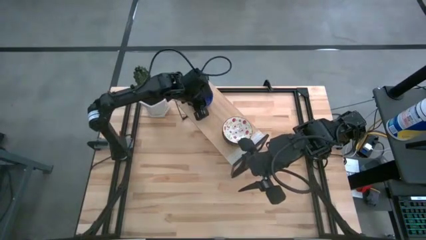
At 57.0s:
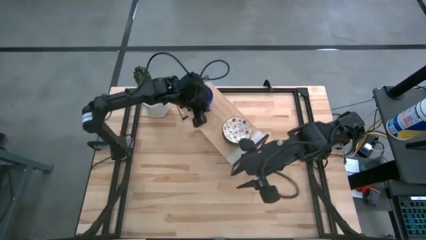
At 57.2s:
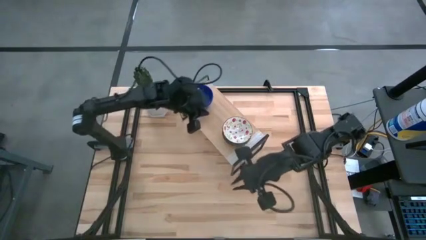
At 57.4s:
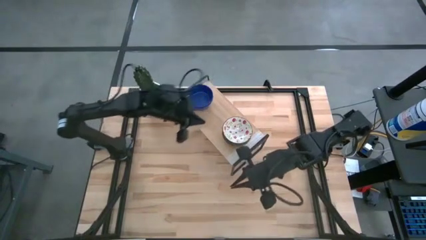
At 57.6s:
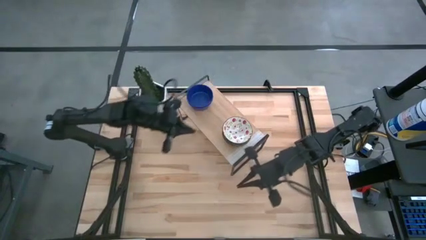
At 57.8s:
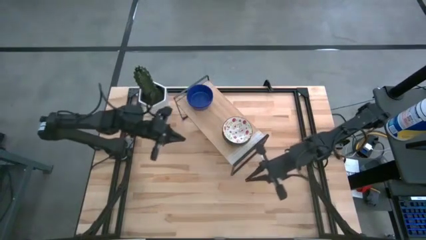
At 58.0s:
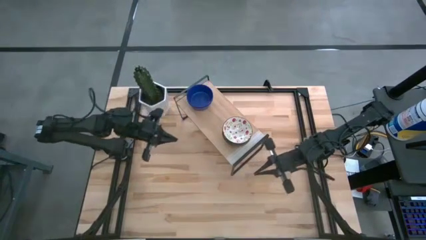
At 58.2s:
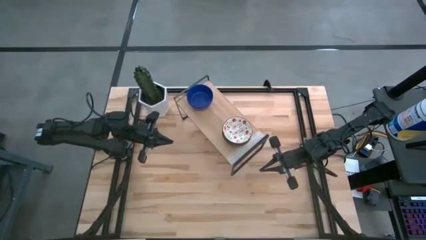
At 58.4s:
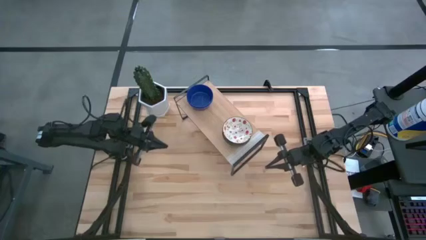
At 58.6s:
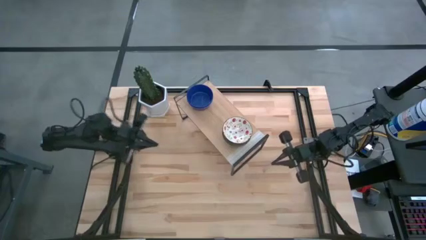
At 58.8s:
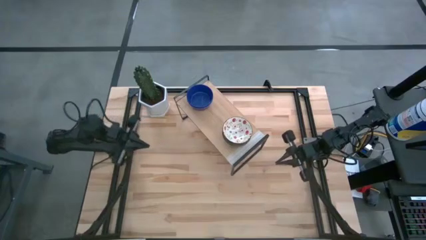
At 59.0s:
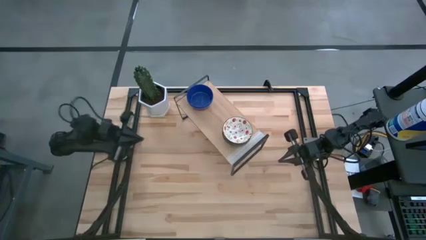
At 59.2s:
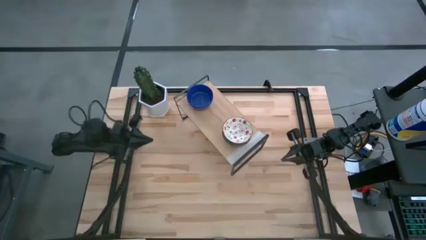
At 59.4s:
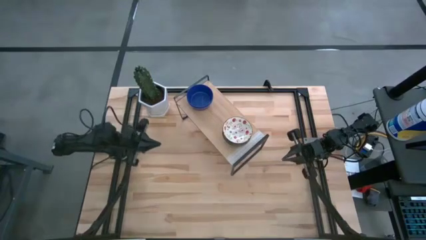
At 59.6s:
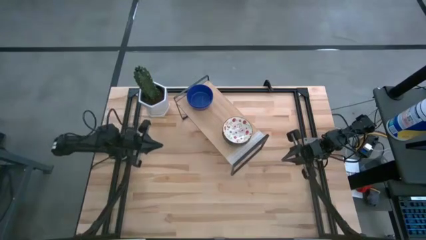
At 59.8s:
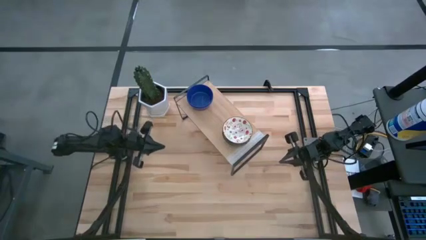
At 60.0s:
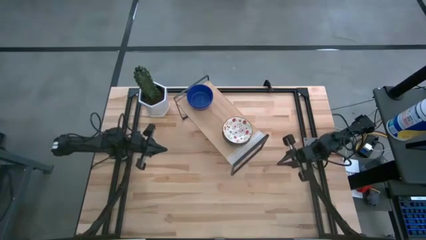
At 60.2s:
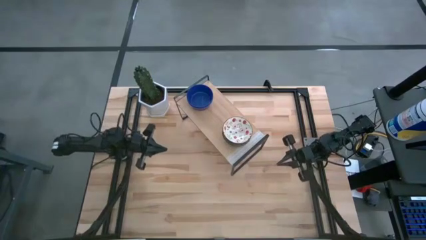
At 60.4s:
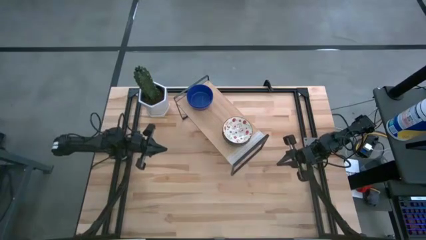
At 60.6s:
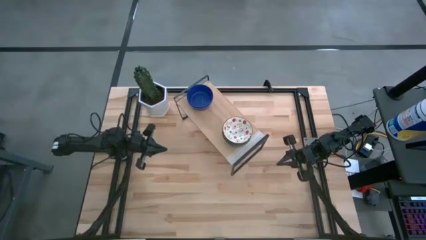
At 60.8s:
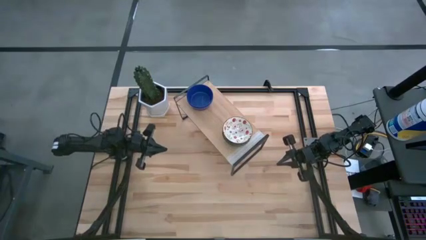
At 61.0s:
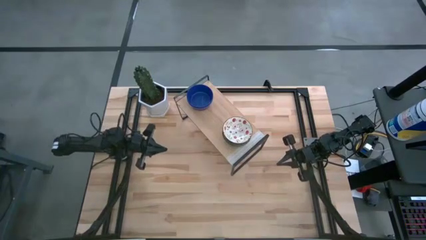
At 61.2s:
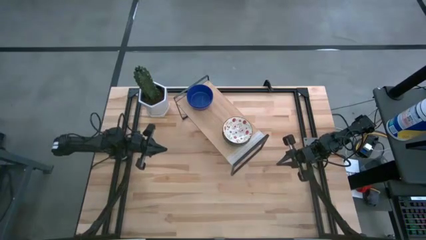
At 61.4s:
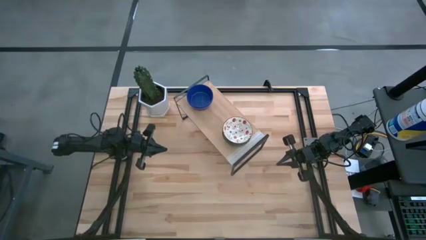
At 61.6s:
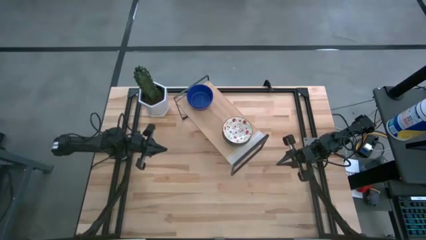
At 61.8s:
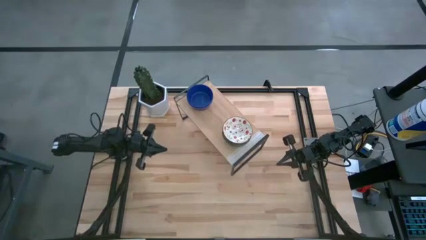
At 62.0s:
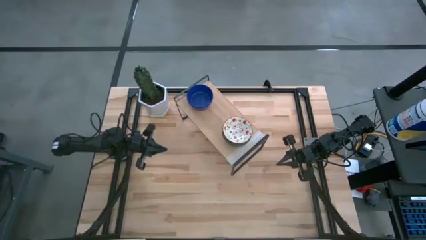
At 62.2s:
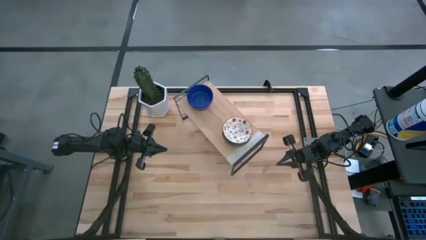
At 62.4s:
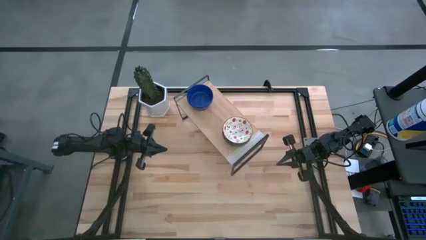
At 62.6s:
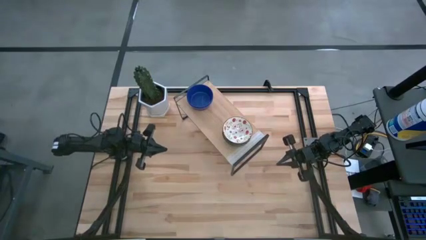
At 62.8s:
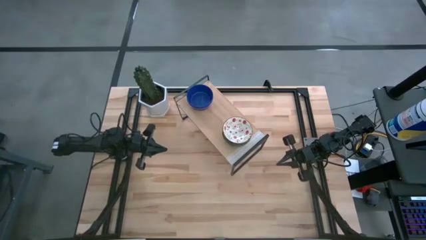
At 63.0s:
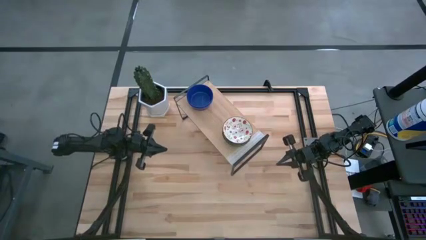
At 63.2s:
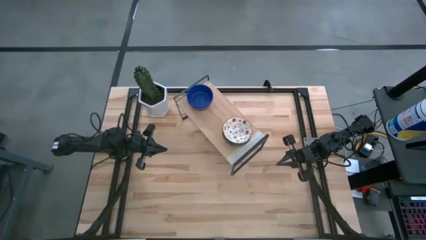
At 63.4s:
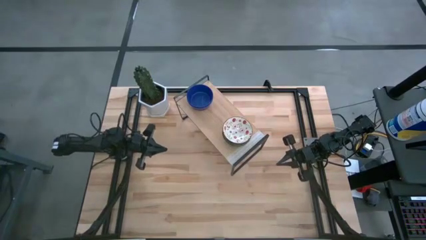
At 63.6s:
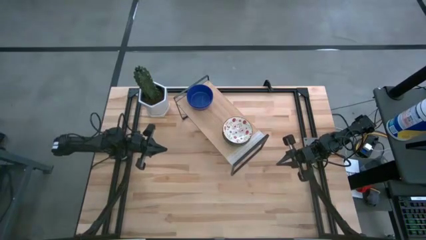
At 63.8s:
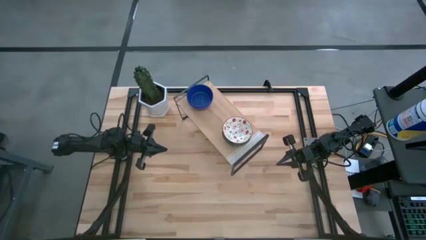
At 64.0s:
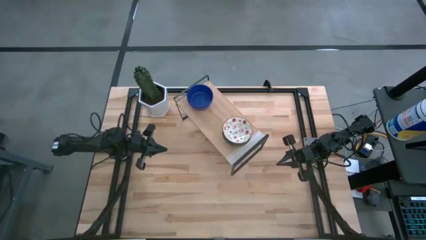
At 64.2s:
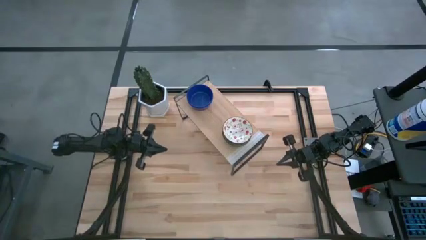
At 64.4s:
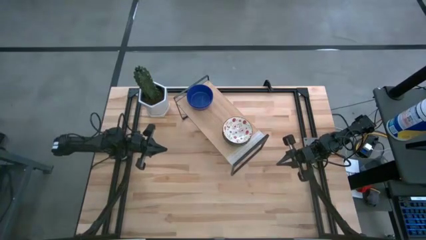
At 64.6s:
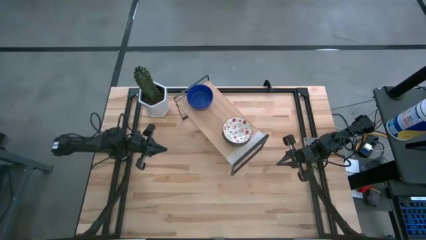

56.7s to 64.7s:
Task: Pick & Place Mini bowls
Return to Home Position

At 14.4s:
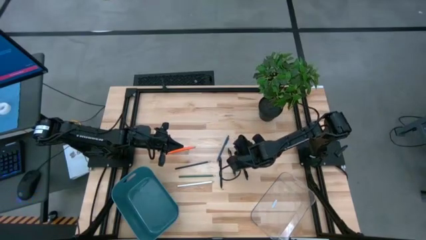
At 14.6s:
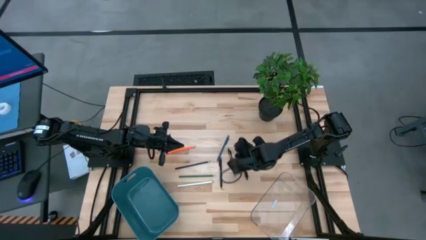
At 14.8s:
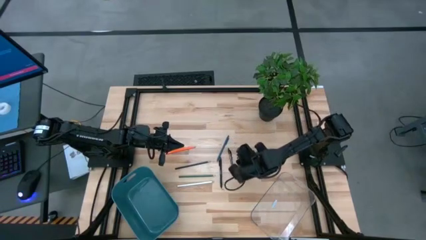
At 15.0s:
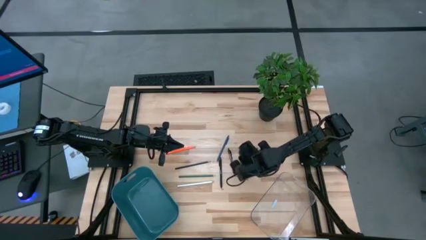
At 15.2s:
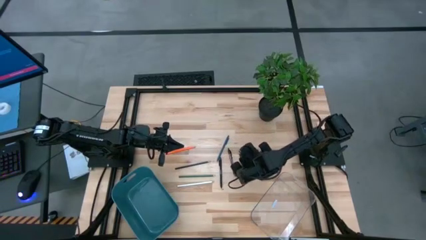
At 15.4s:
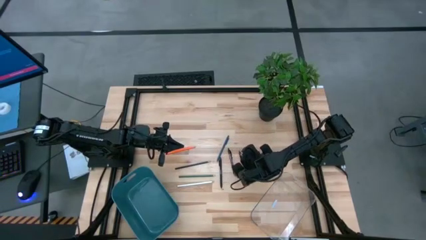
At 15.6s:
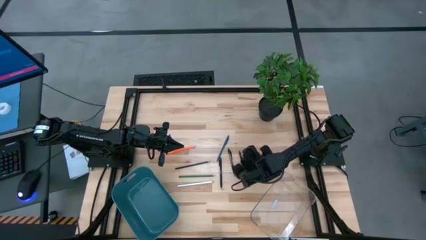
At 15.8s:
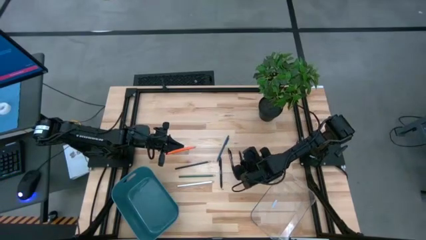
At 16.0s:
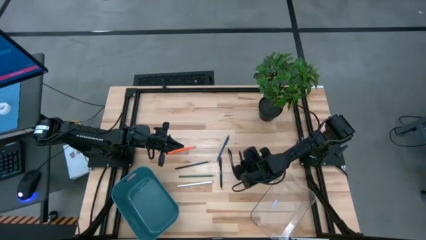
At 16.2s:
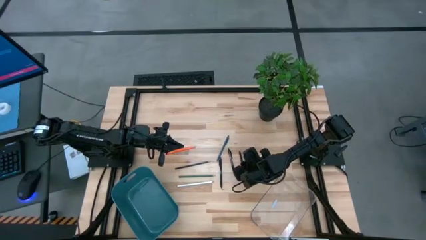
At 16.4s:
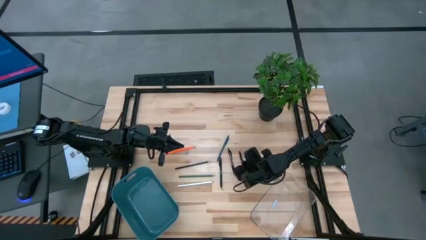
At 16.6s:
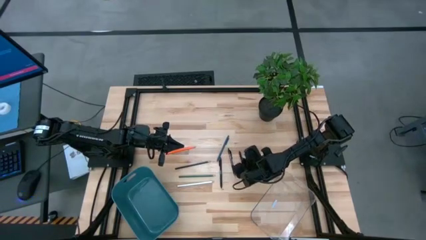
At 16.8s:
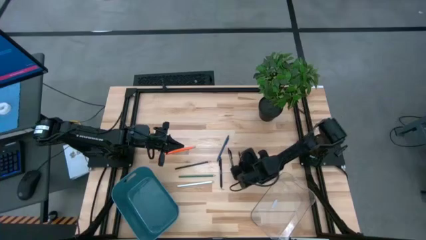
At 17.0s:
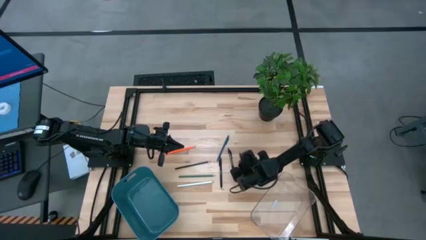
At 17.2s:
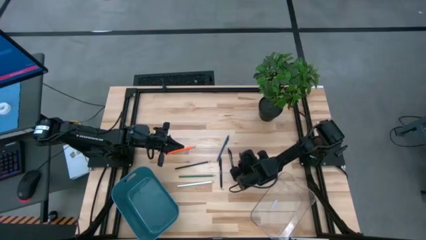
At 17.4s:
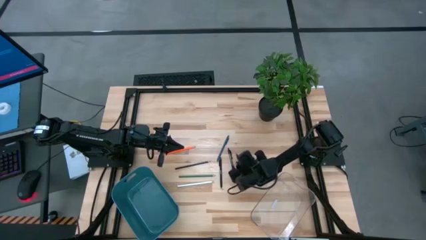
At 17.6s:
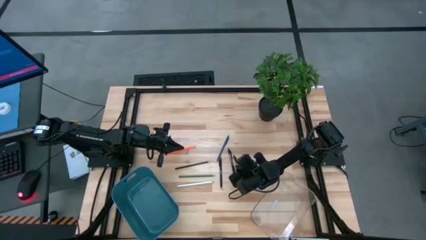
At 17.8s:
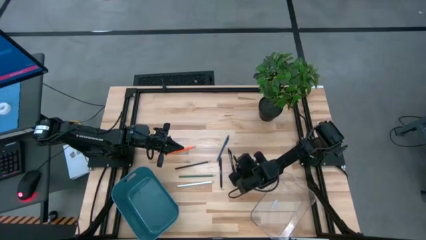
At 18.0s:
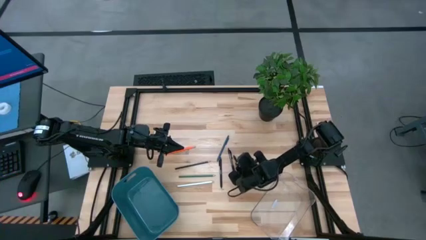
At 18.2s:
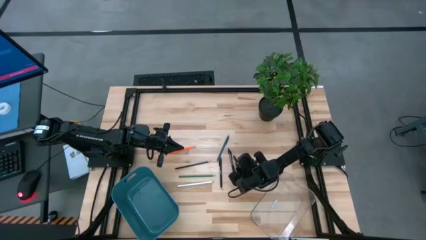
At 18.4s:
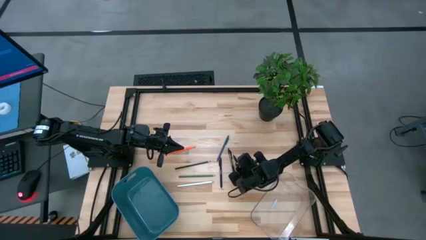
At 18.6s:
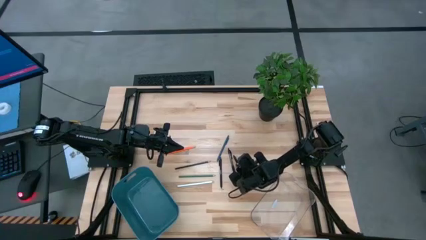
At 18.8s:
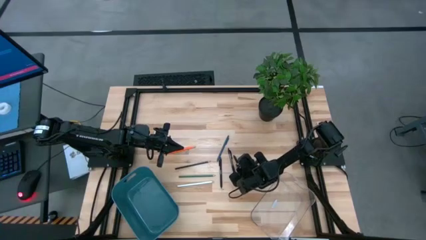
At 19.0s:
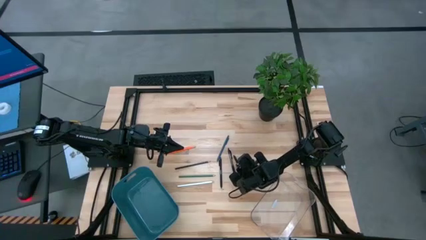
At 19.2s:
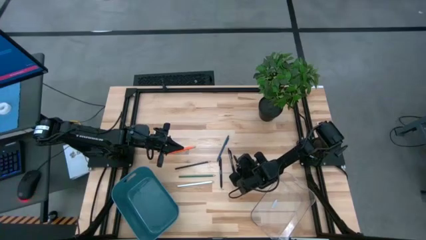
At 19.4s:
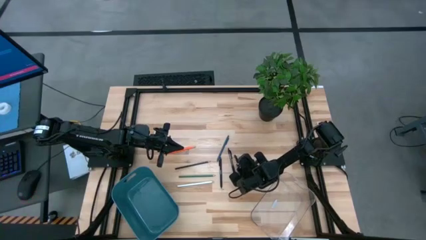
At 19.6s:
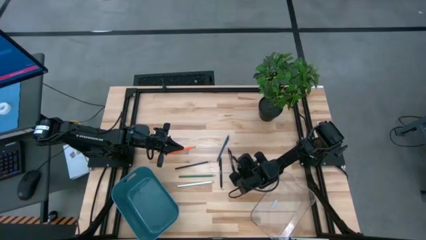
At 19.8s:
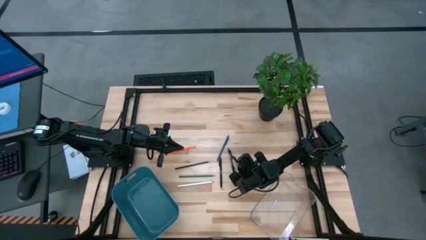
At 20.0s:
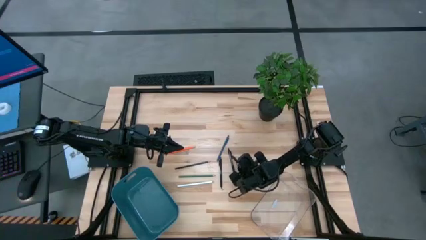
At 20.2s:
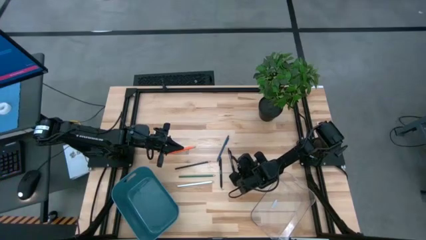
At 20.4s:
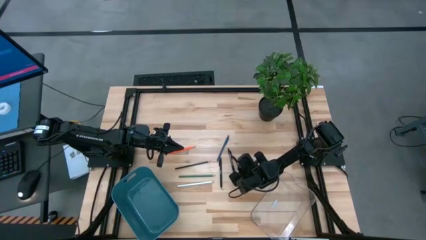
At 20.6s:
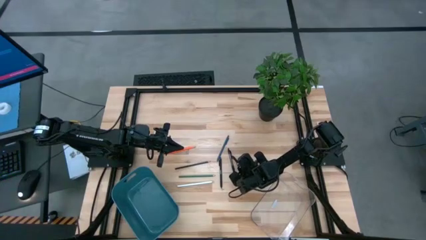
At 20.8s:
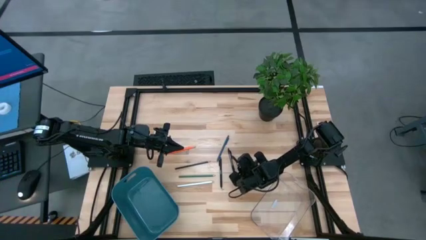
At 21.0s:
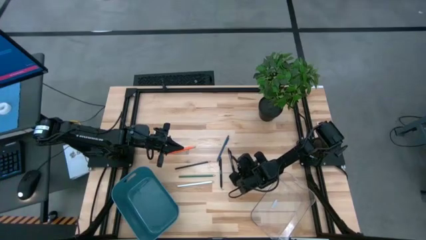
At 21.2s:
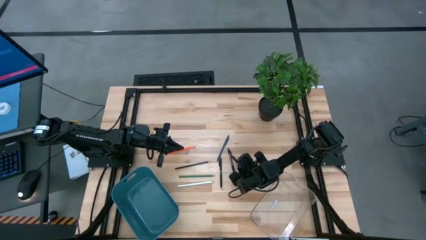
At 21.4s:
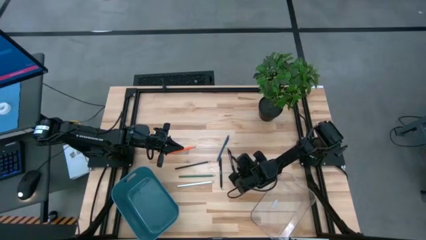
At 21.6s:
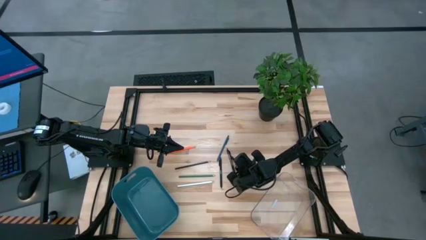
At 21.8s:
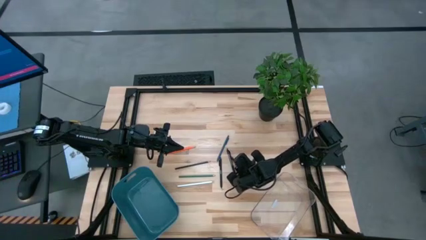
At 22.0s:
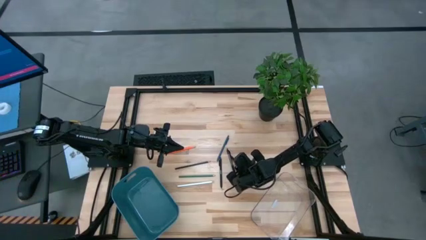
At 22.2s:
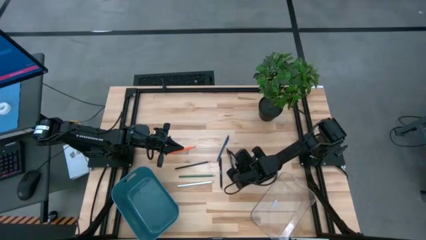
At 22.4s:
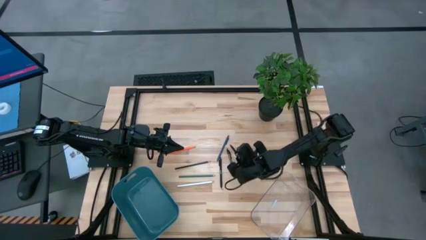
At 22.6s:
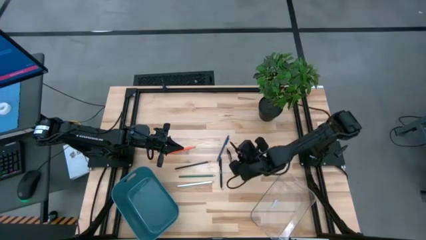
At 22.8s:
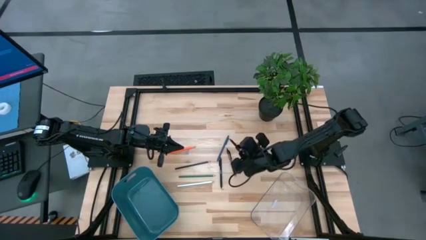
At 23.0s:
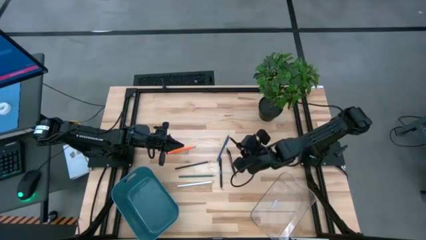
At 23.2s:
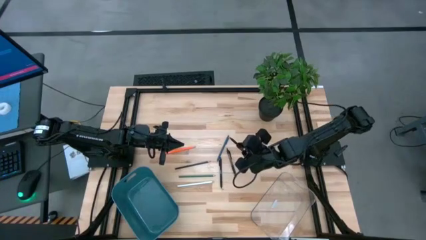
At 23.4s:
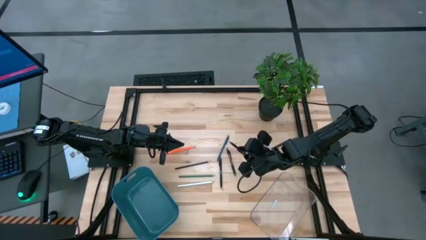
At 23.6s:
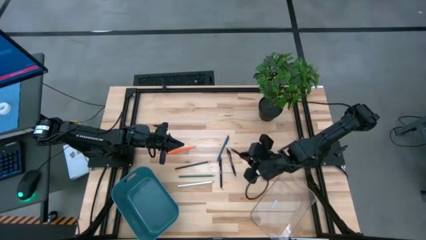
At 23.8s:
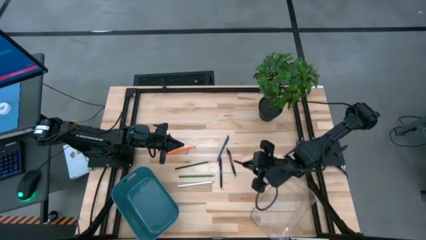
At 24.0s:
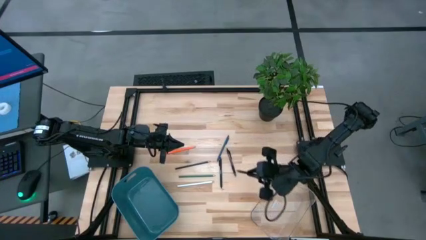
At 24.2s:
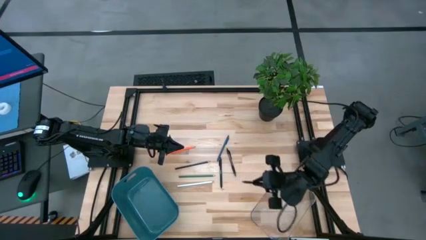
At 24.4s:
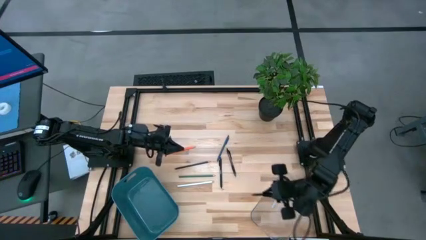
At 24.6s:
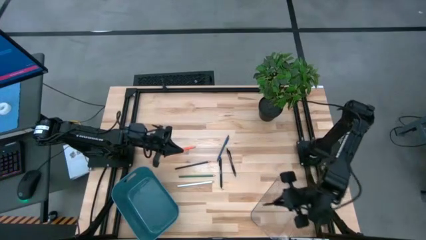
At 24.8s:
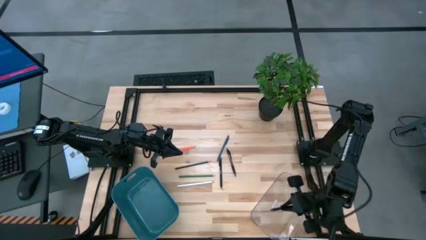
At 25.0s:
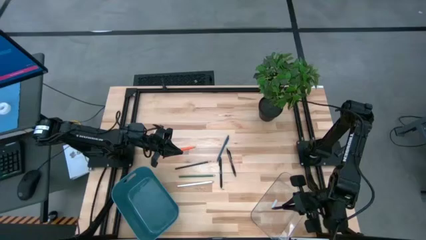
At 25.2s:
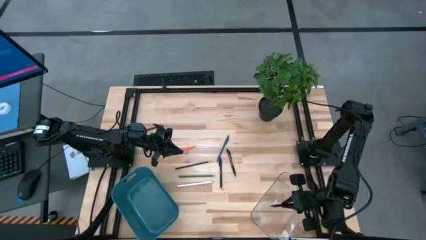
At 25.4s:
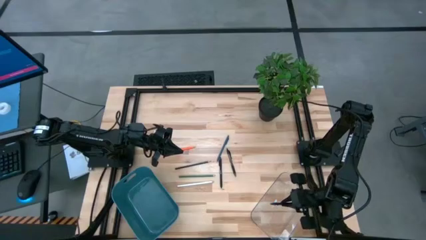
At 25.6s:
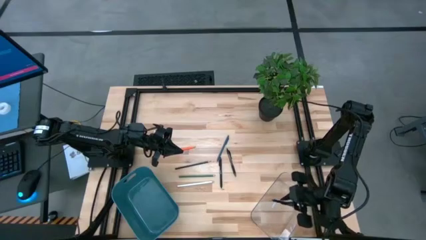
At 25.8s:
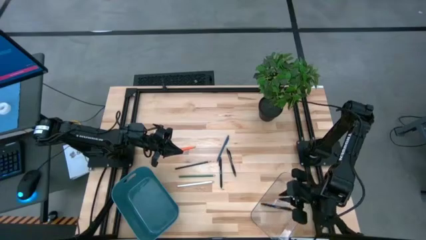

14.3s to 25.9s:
Task: Sort pens & pencils
Put the right black pen into the transparent bin
